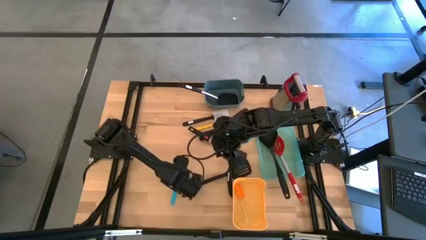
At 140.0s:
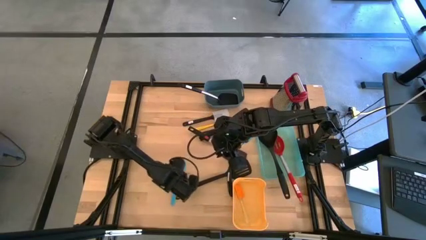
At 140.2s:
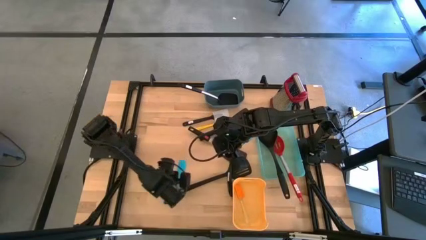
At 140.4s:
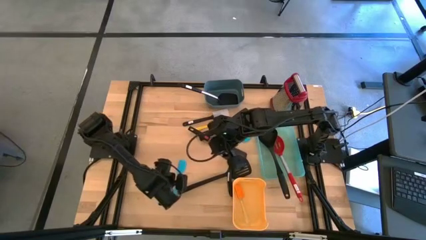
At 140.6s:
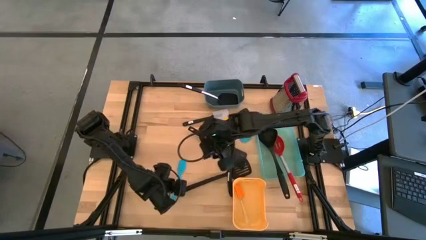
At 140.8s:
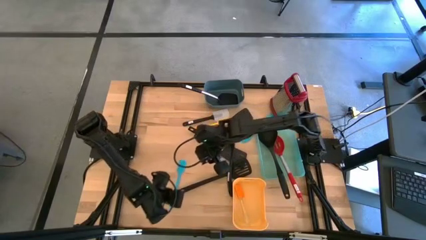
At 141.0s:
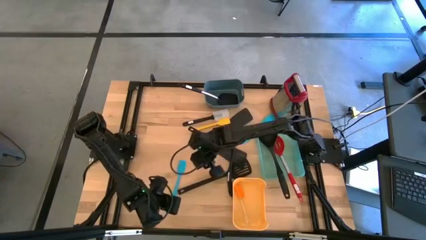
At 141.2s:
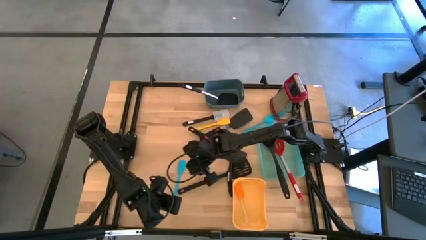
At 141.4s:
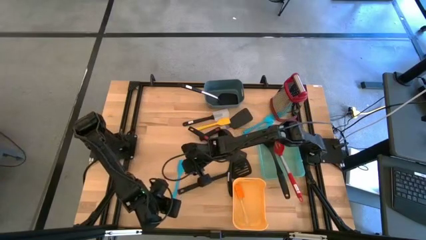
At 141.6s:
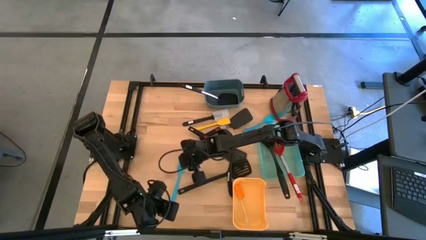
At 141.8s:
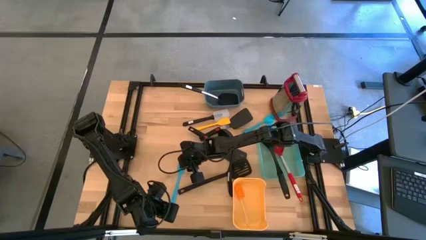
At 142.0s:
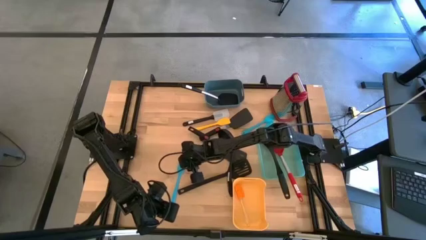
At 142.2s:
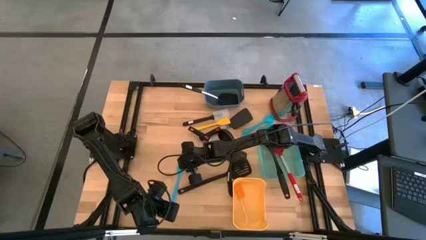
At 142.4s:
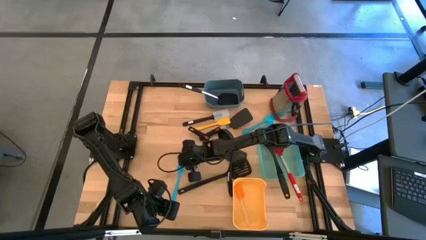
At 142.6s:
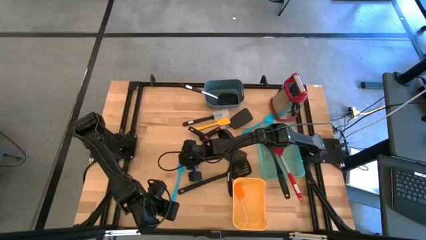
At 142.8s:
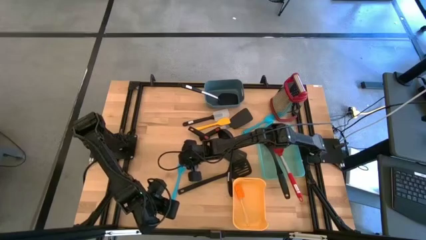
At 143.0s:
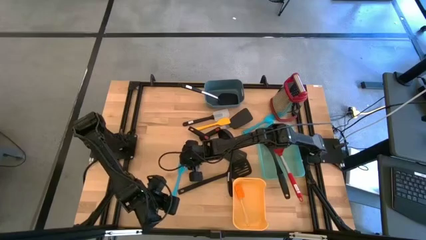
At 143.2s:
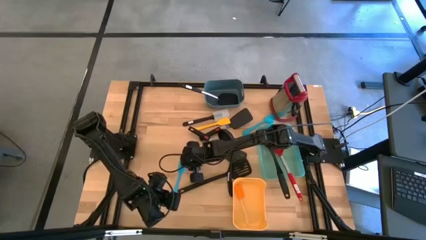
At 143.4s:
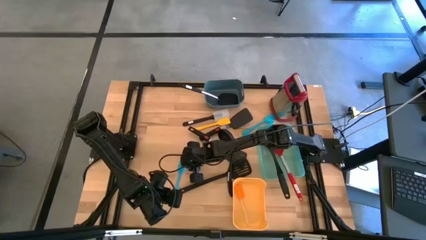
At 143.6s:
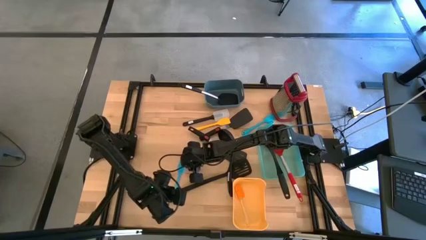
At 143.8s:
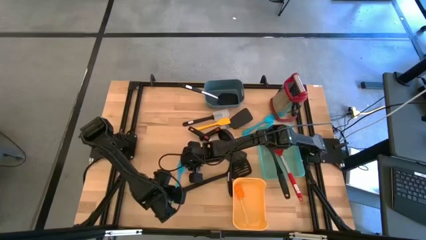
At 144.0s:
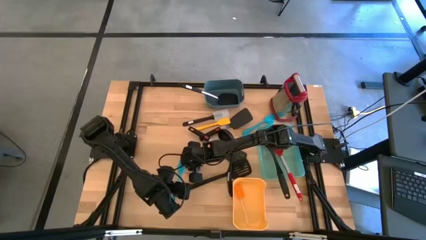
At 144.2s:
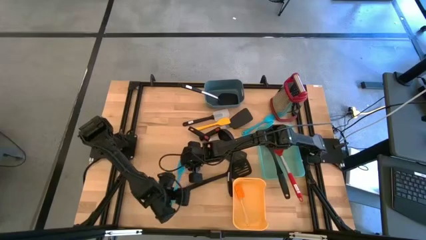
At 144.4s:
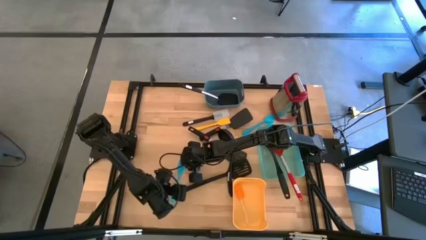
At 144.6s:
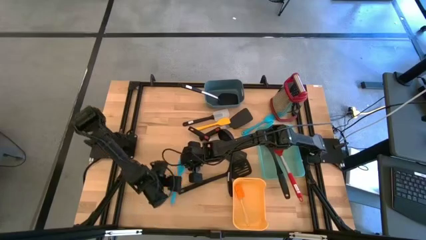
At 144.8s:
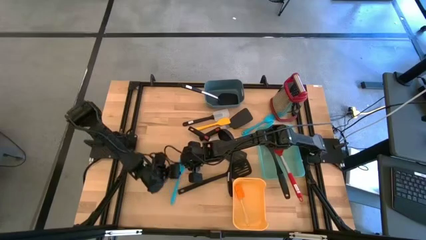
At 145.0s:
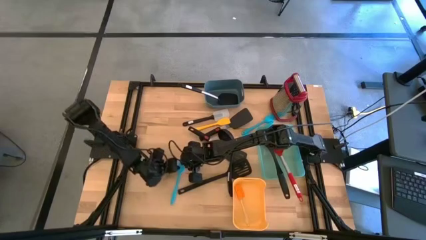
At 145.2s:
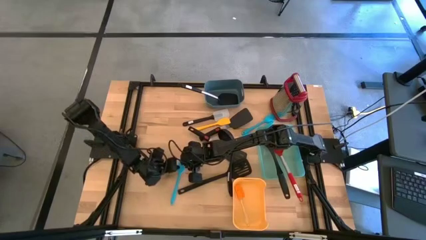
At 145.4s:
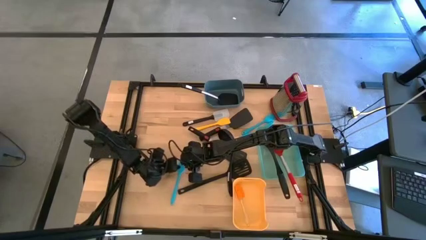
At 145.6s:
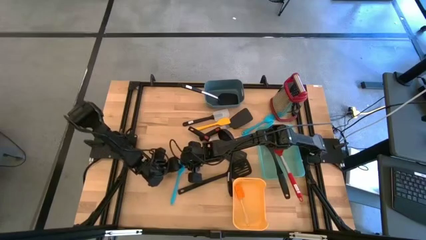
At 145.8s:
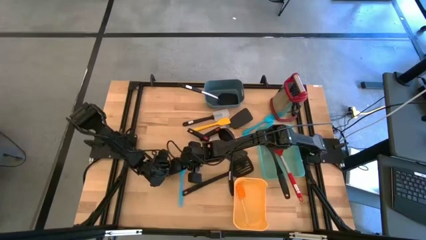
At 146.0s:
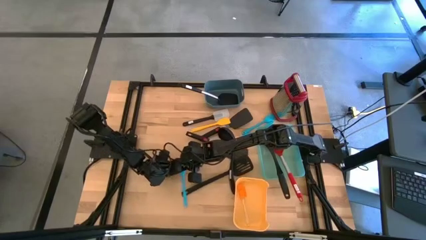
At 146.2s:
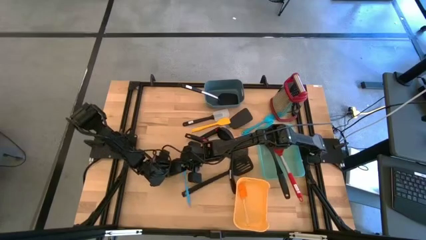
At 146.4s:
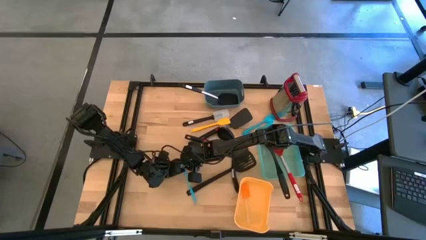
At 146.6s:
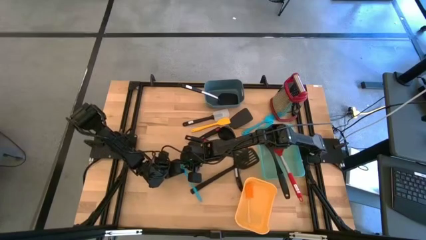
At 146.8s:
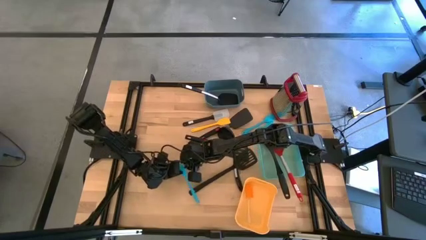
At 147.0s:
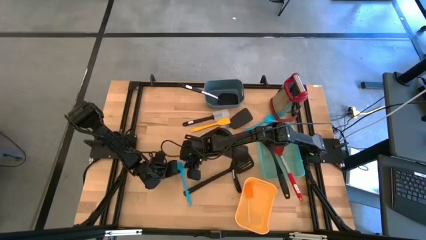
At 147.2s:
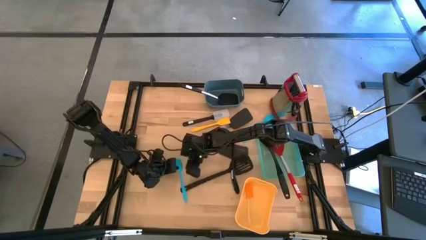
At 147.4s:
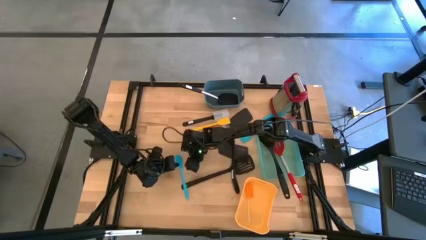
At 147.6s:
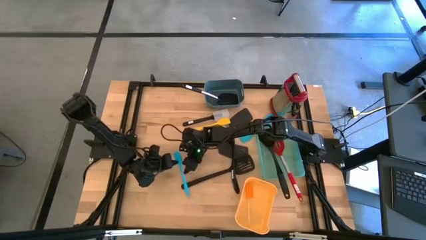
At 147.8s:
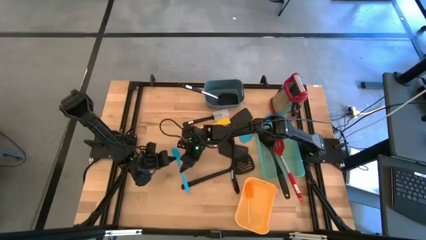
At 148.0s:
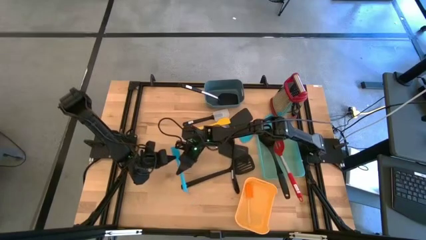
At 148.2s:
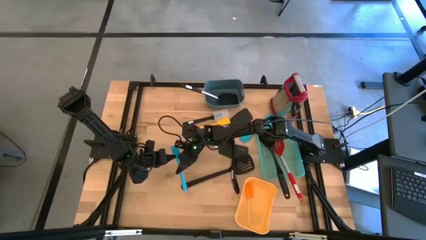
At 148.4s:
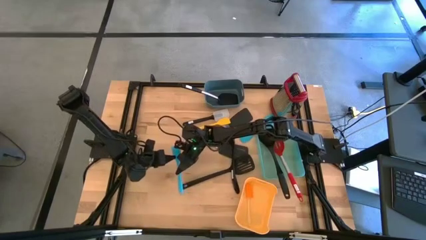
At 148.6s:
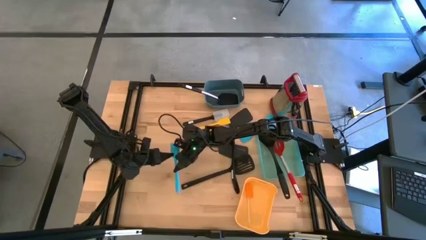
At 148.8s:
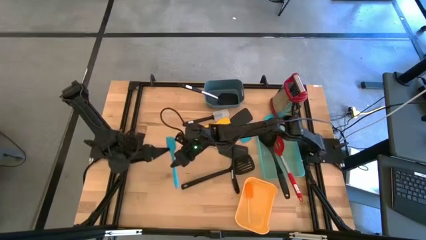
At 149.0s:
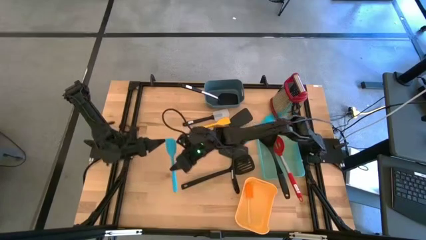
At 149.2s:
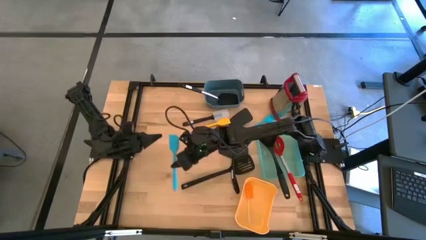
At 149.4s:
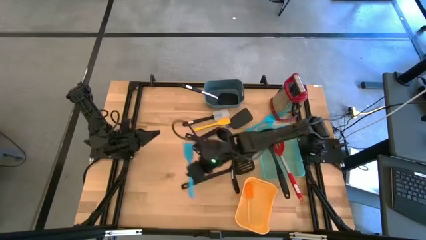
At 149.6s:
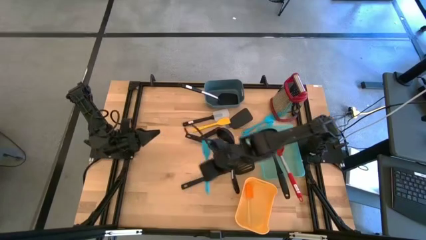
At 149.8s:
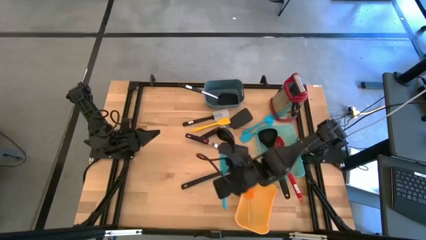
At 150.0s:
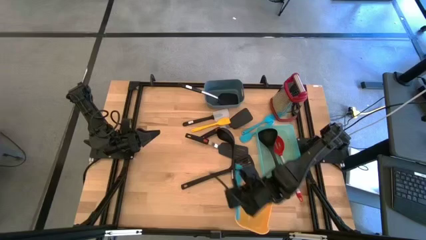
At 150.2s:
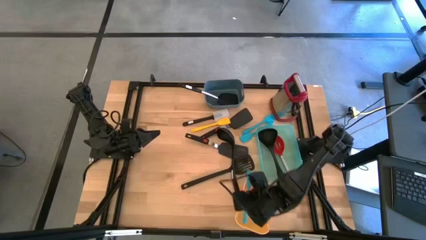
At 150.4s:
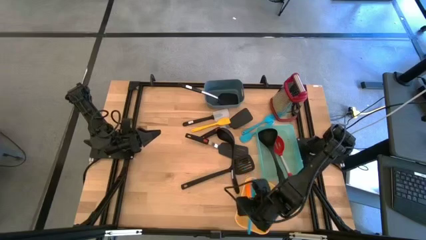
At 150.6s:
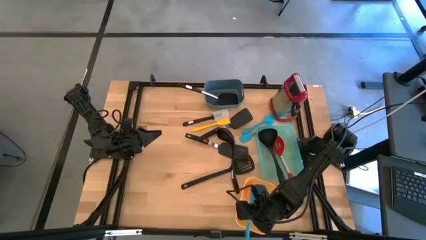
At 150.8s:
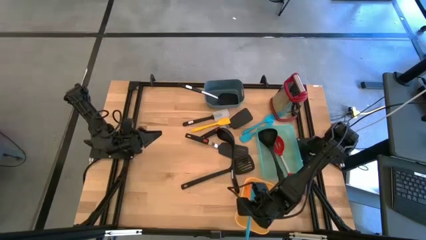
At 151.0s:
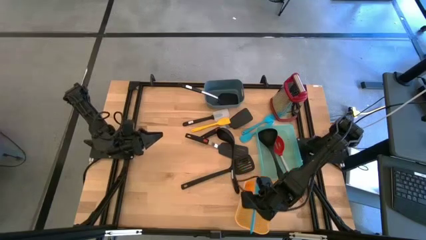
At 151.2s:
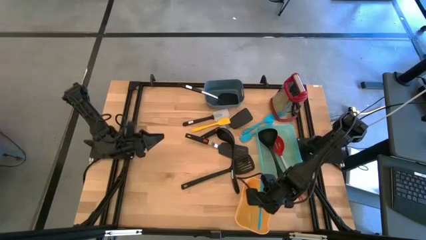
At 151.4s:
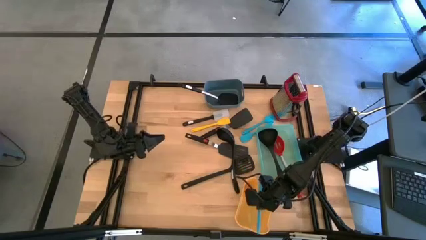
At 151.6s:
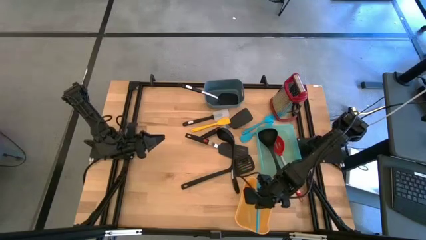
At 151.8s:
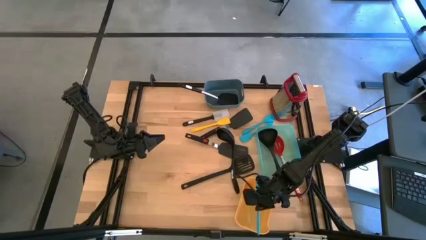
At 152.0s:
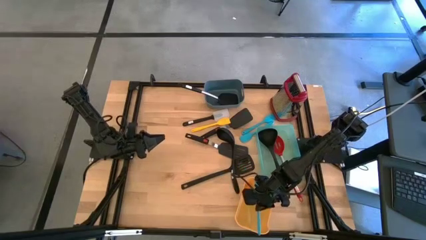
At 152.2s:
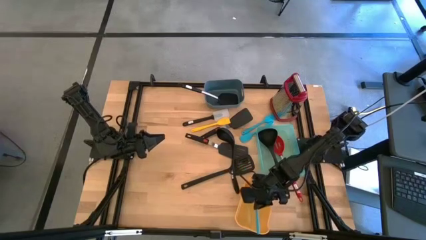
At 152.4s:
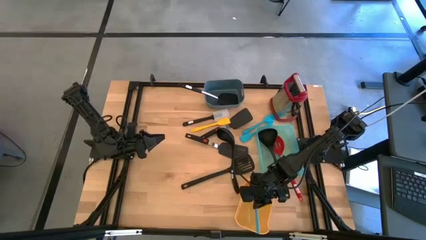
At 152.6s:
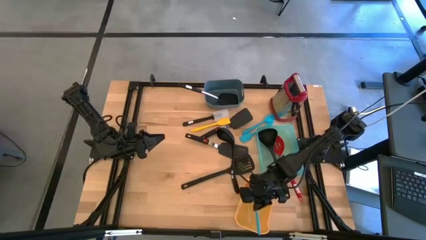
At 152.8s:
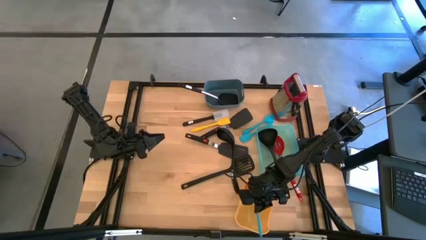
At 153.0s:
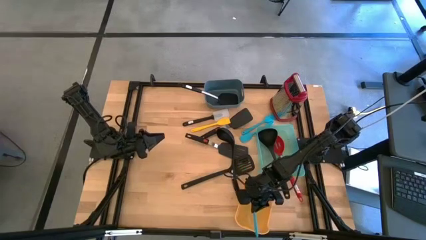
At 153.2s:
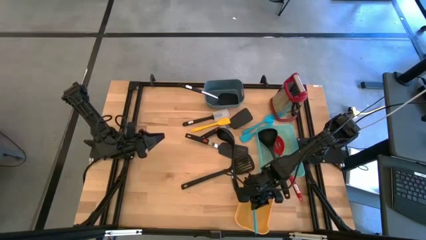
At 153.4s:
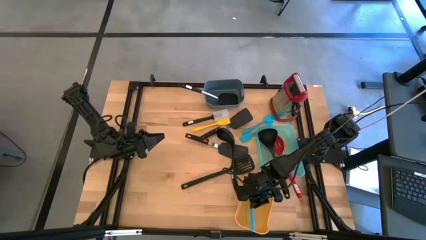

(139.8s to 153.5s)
Task: Pick & Place Kitchen Items
Put the small blue spatula into the yellow bin
